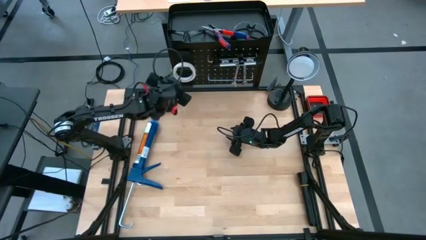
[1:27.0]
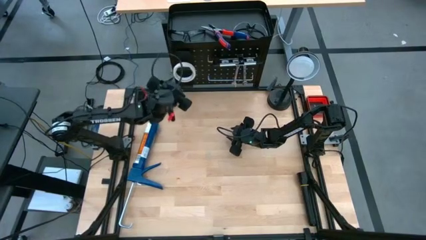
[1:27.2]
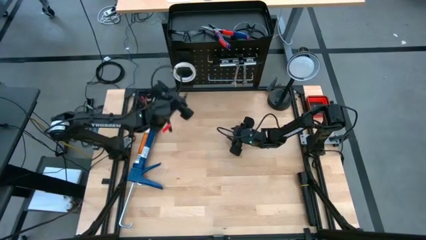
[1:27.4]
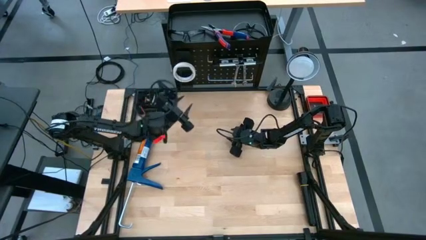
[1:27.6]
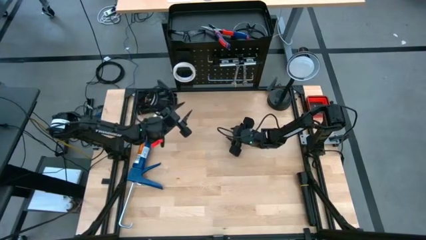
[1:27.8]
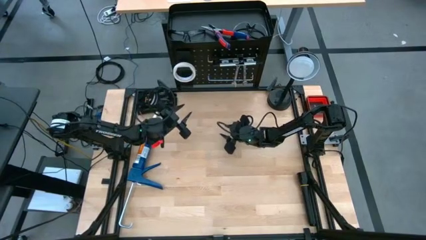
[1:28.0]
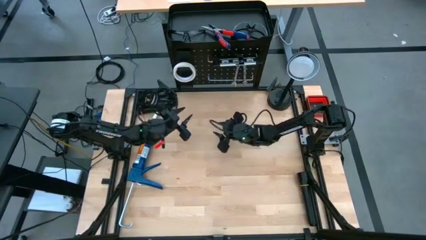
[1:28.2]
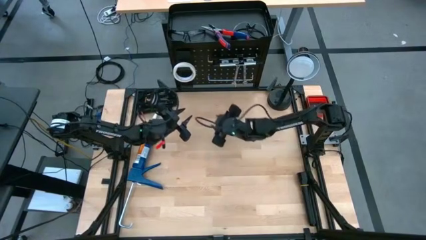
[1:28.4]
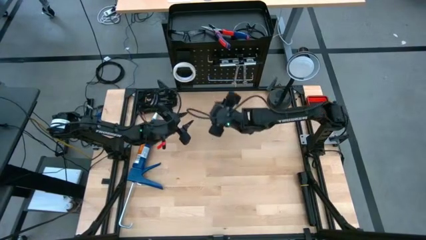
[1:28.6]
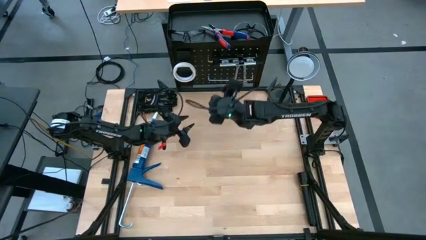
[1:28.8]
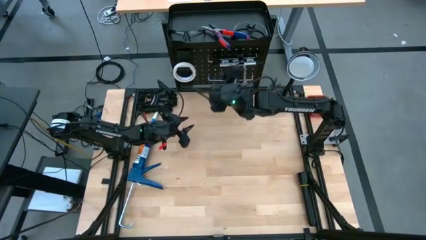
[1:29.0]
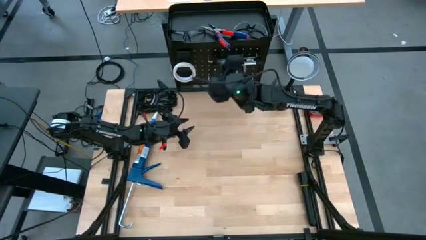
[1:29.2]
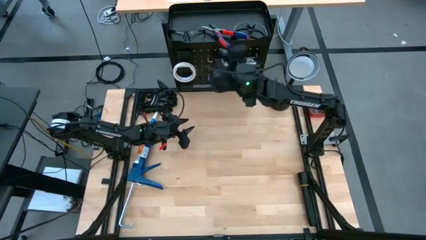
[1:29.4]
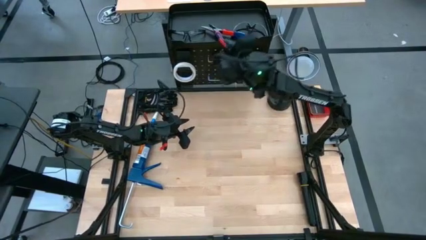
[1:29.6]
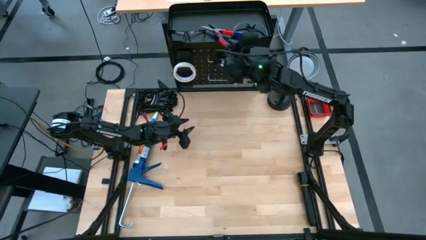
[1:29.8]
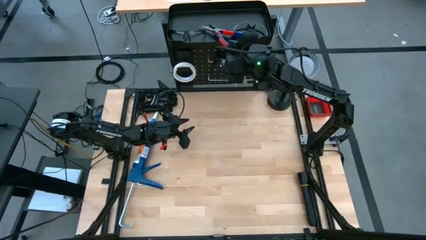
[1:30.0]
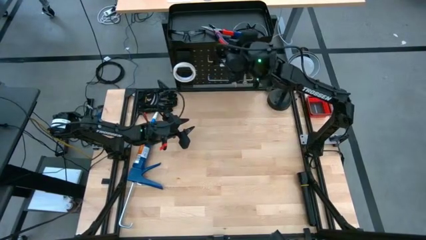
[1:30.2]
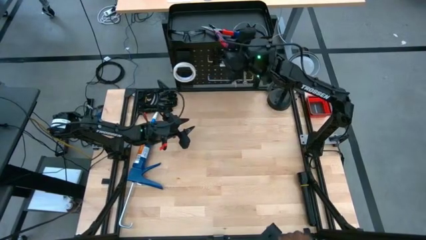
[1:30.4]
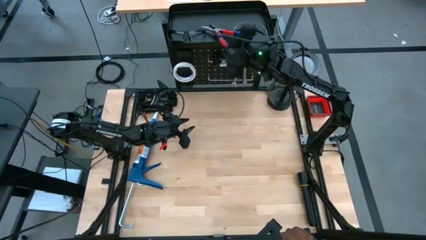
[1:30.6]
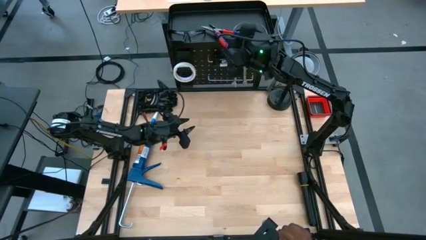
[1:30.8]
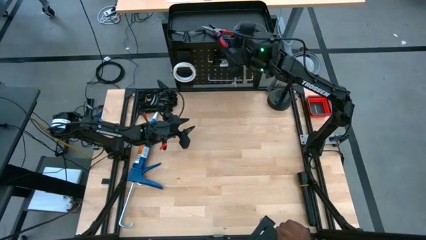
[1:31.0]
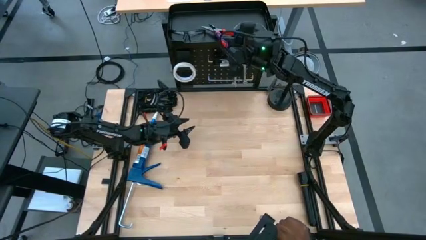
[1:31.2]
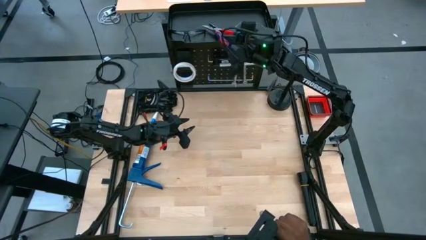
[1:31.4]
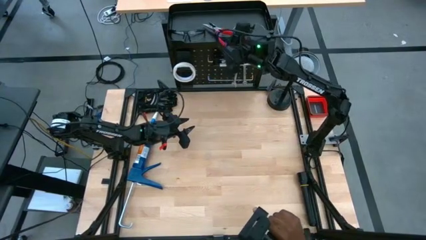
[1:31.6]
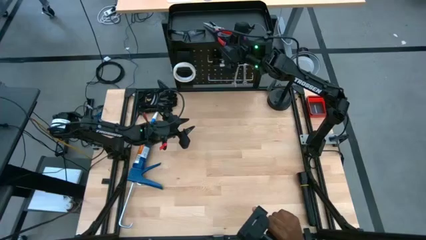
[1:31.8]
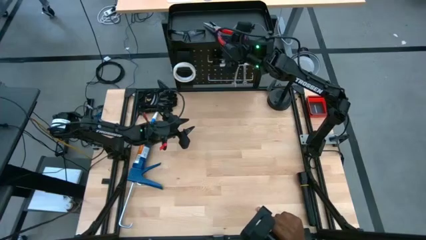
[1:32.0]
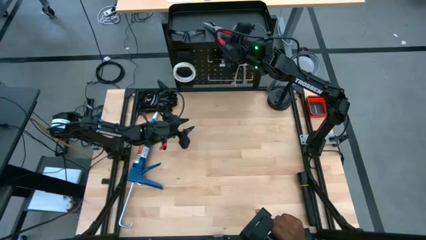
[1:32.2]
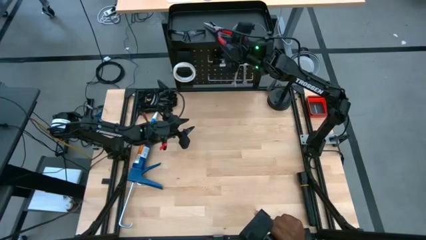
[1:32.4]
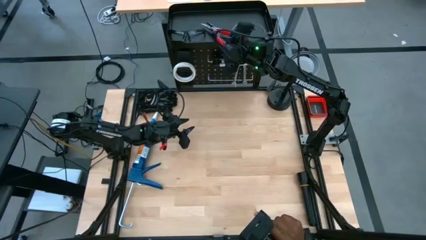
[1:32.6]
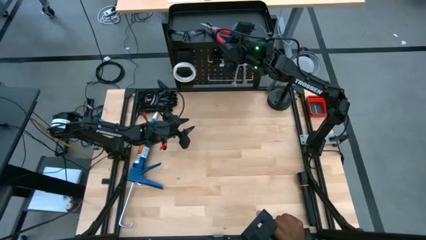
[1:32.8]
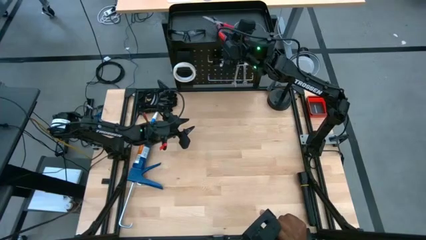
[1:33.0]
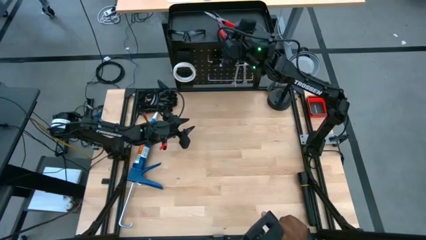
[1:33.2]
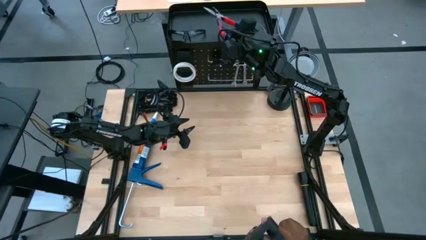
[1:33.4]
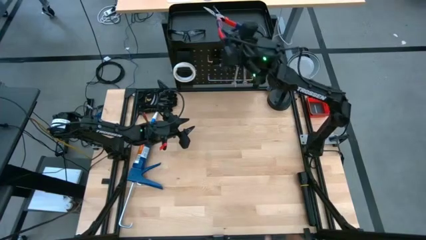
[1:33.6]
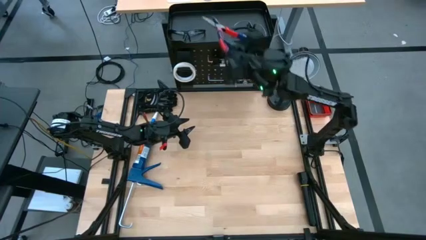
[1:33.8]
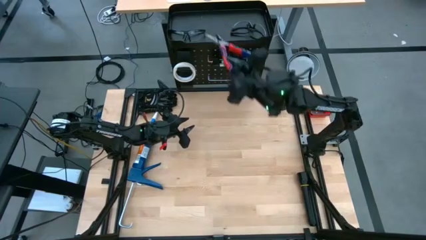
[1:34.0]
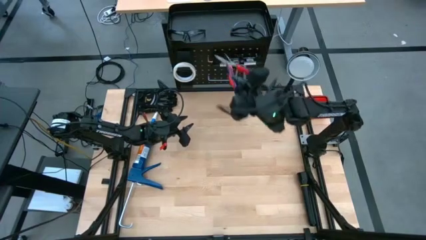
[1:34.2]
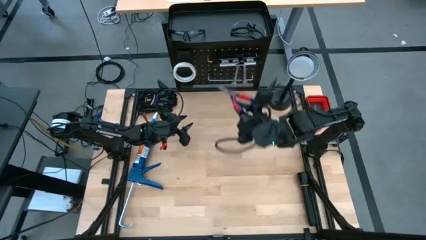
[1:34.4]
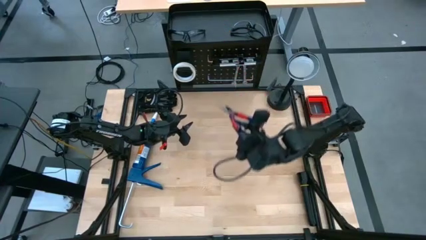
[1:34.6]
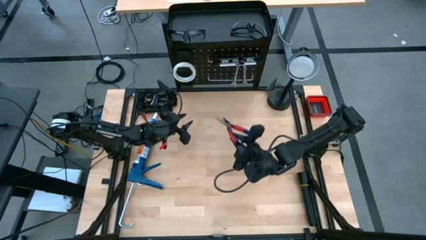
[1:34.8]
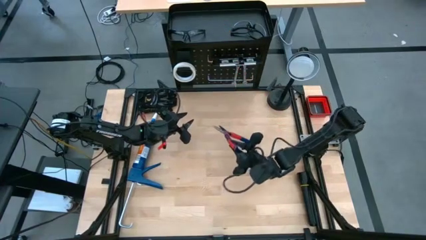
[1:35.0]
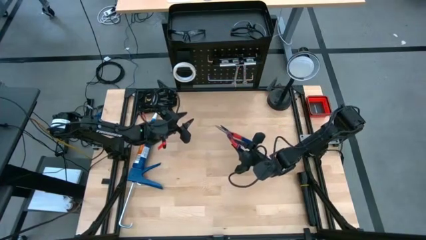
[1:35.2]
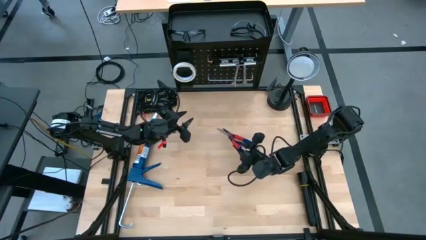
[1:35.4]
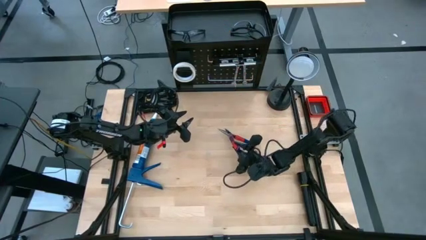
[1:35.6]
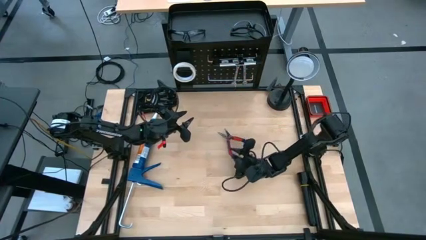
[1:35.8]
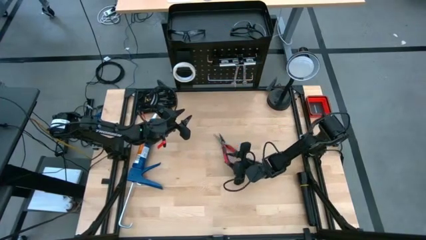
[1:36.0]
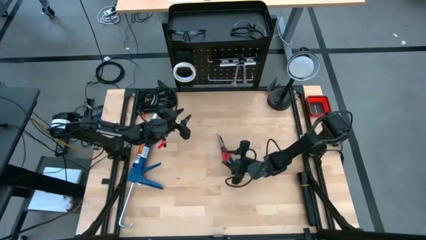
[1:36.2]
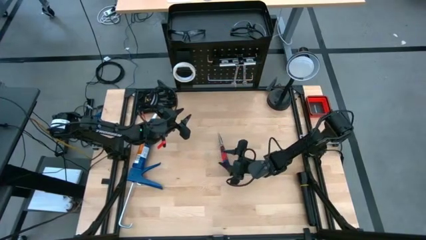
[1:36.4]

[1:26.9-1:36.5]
Task: Hang tools onto peg board
Remove the blue-orange pliers from the black peg board

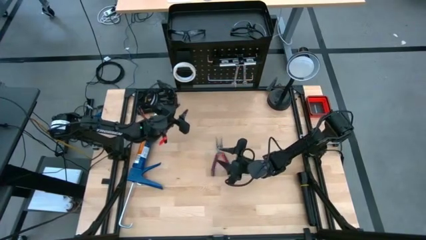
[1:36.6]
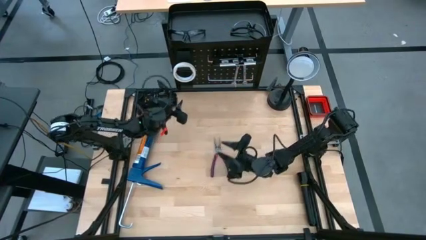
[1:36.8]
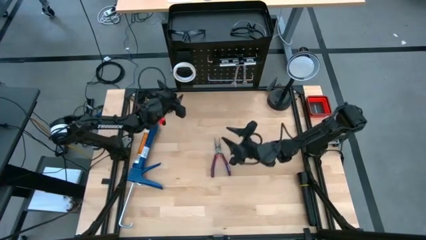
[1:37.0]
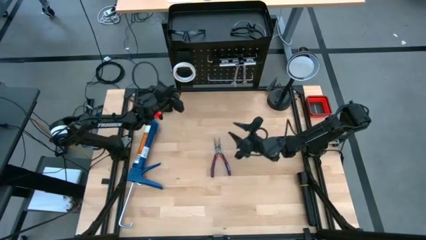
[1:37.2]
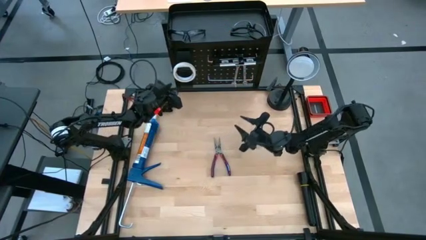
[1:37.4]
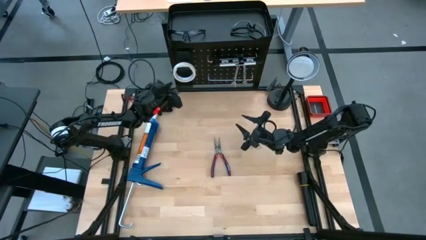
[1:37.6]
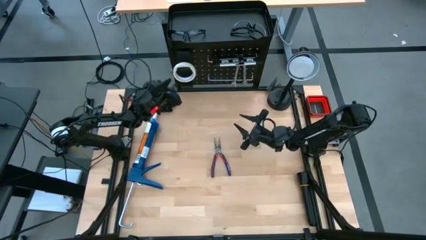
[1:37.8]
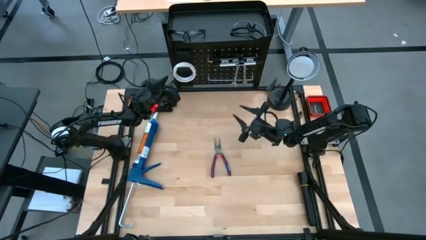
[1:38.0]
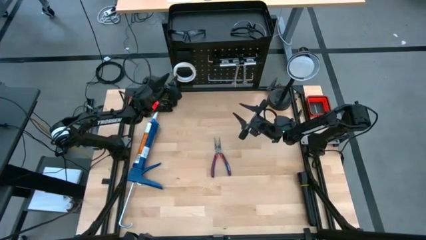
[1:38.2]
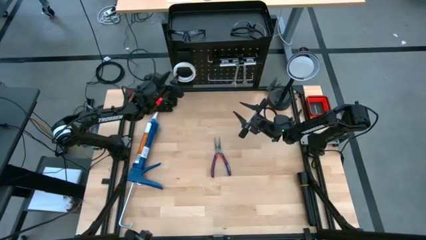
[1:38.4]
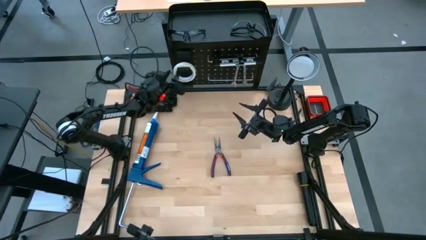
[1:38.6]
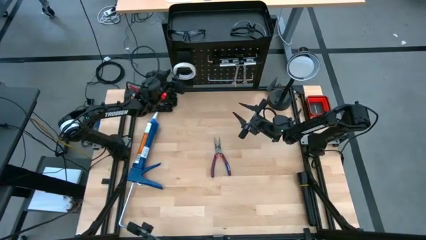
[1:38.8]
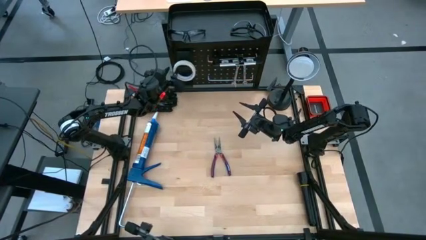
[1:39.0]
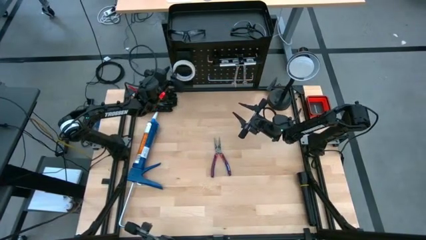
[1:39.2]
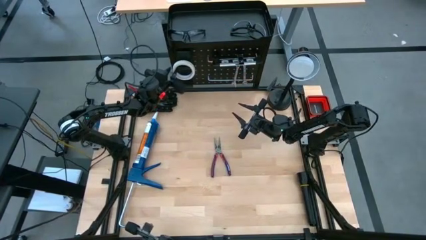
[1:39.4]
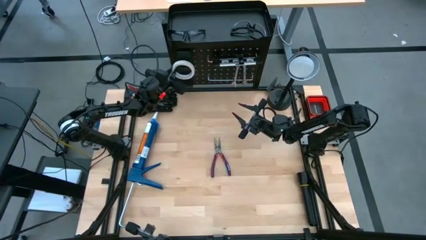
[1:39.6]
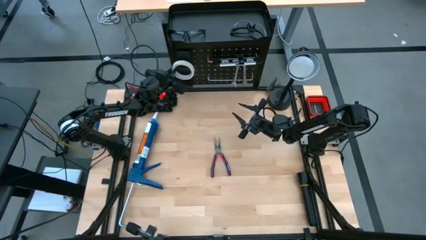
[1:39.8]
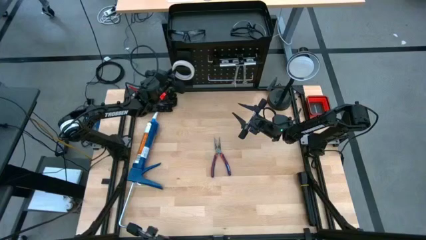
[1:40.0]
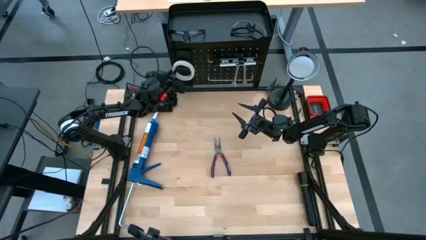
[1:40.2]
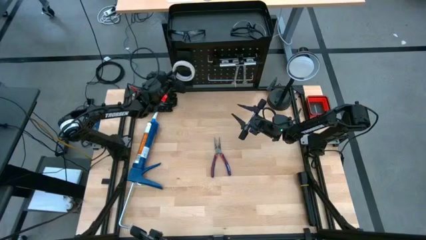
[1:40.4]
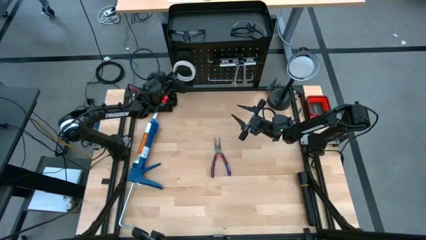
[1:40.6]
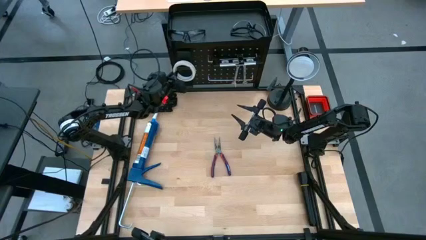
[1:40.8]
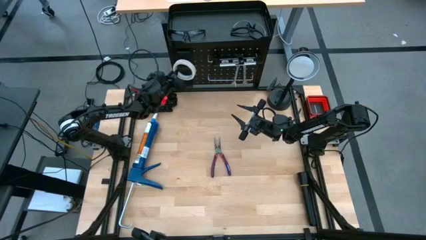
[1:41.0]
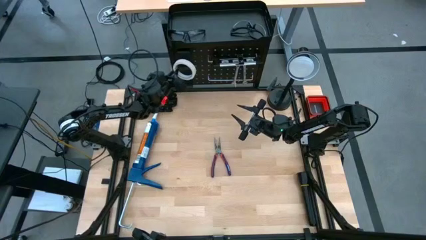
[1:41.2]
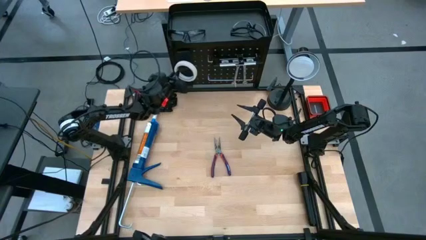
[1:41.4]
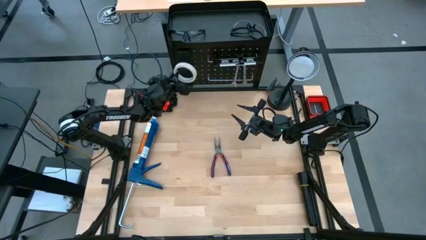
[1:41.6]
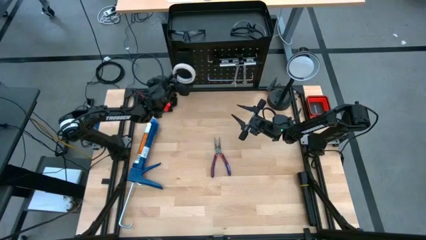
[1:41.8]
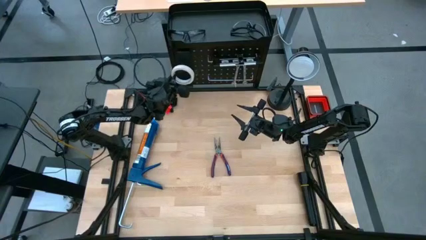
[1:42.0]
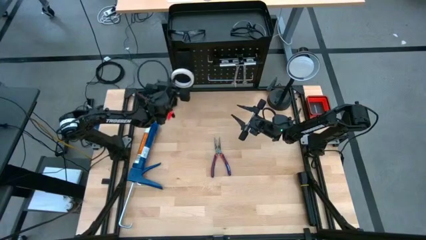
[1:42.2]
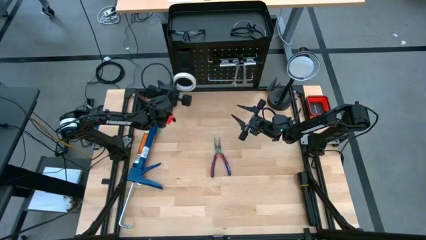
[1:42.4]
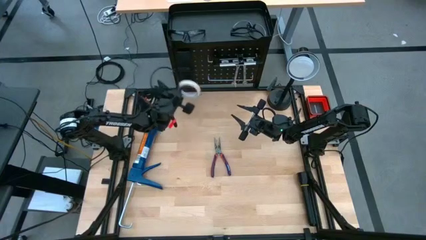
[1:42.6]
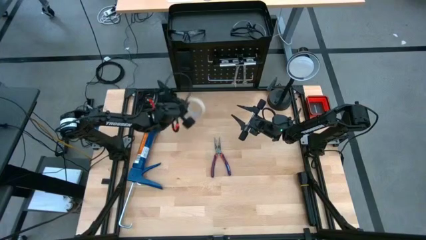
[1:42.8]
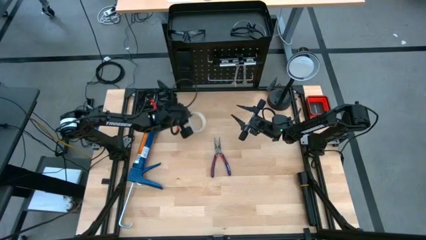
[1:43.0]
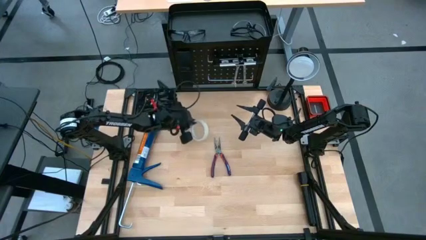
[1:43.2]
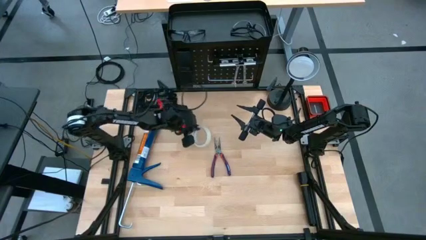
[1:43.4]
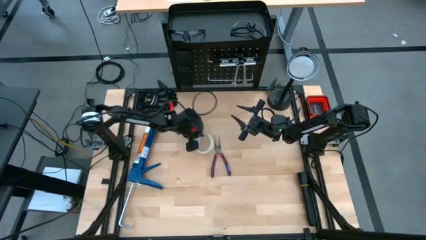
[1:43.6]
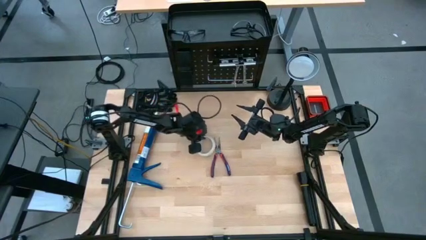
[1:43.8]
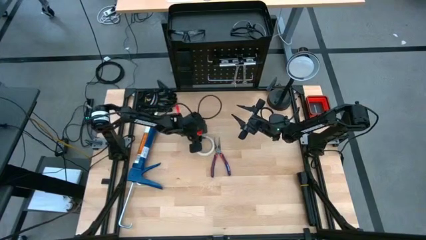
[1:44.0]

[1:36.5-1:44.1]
Unhang the white tape from the black peg board
